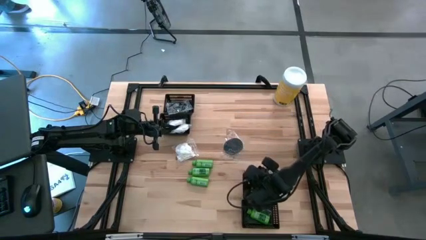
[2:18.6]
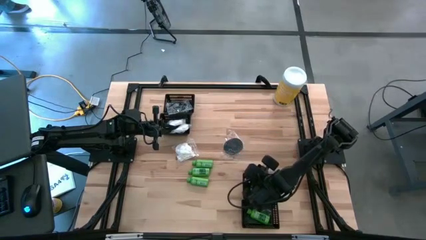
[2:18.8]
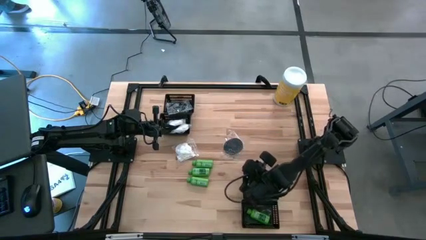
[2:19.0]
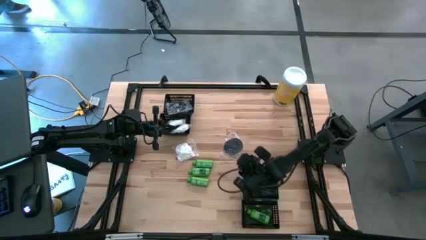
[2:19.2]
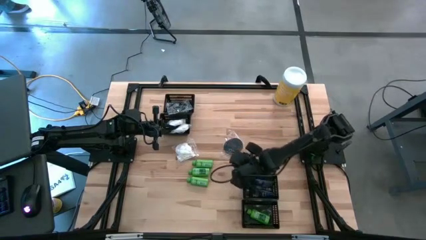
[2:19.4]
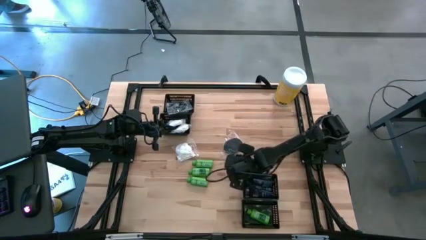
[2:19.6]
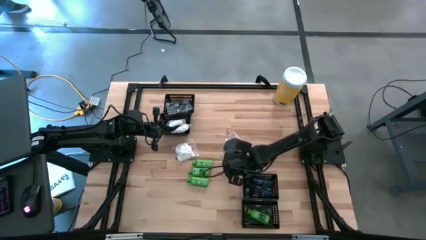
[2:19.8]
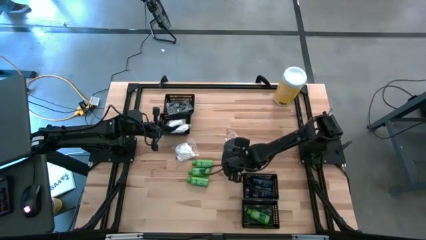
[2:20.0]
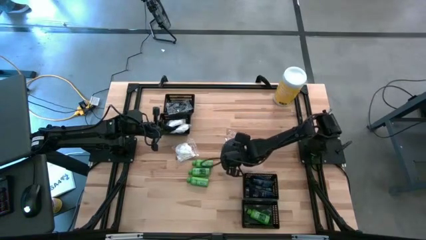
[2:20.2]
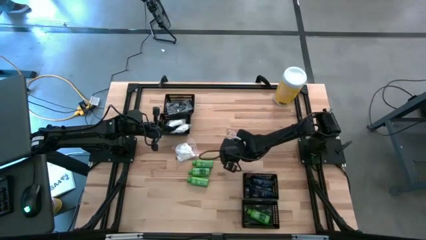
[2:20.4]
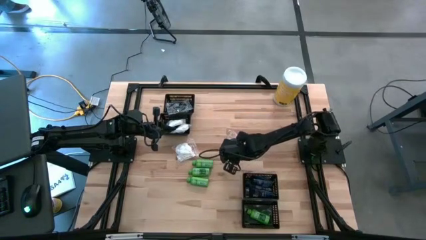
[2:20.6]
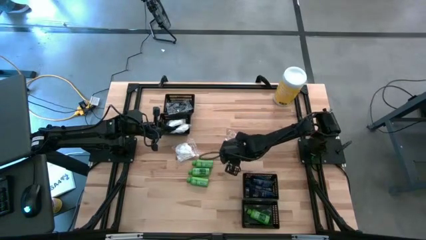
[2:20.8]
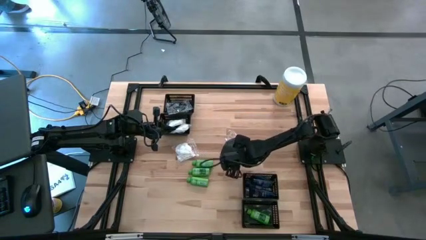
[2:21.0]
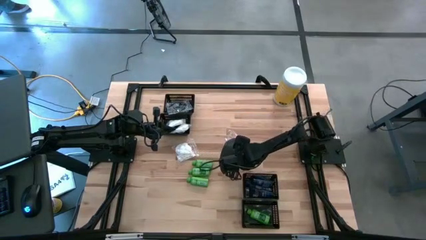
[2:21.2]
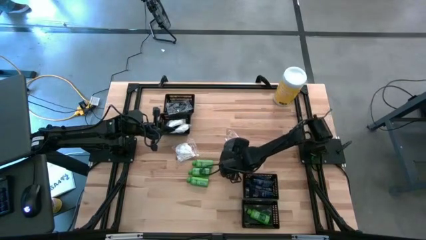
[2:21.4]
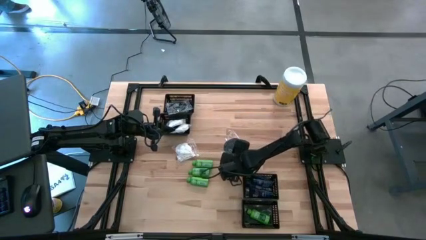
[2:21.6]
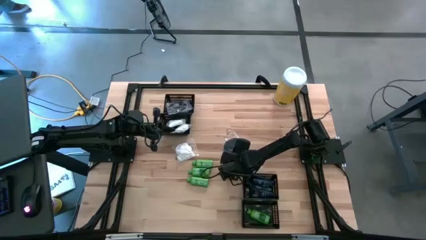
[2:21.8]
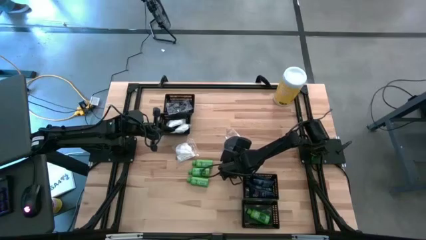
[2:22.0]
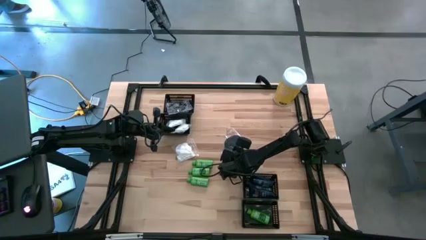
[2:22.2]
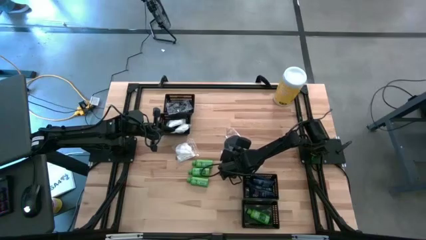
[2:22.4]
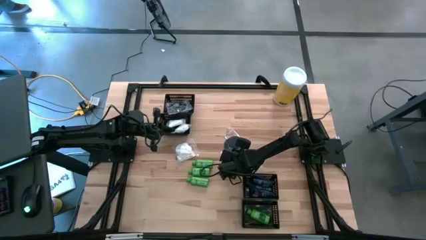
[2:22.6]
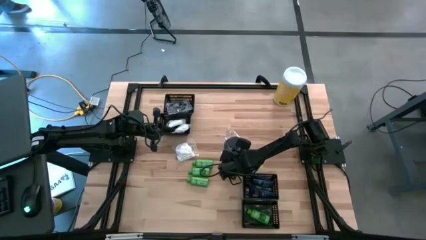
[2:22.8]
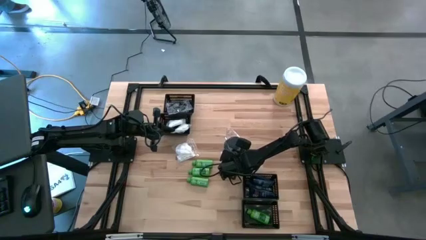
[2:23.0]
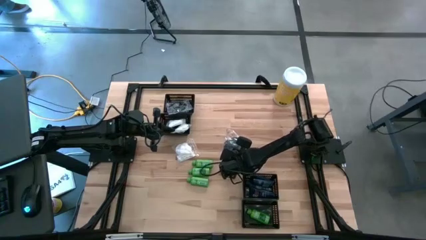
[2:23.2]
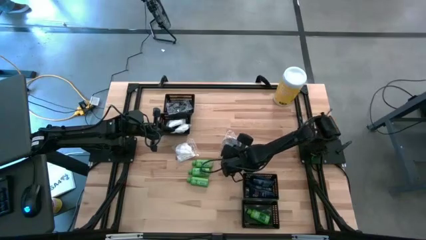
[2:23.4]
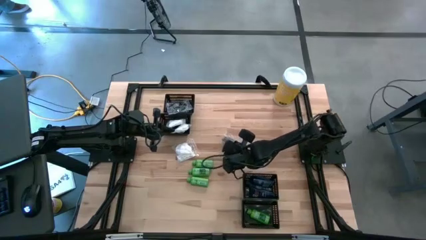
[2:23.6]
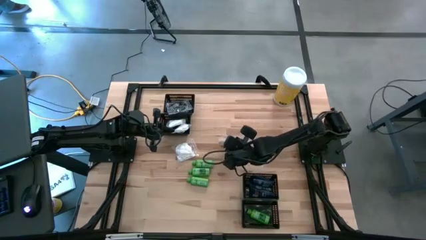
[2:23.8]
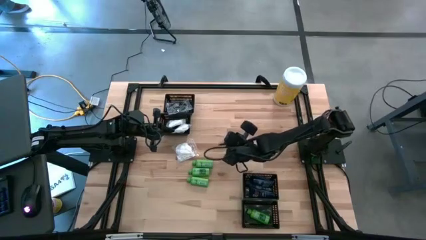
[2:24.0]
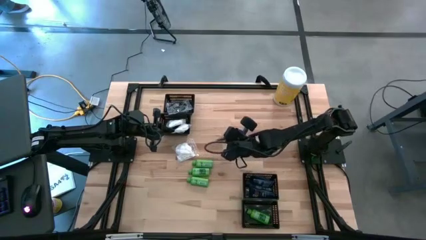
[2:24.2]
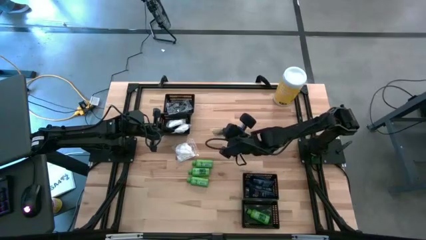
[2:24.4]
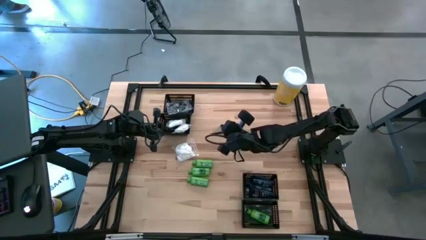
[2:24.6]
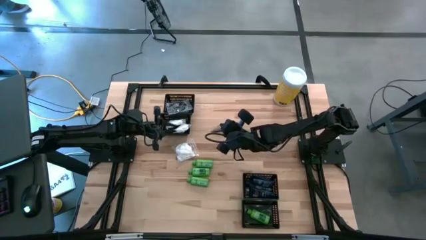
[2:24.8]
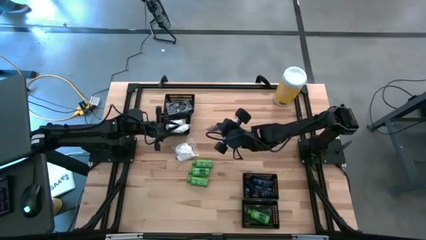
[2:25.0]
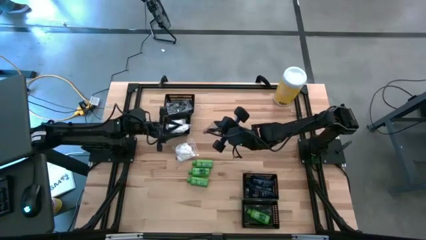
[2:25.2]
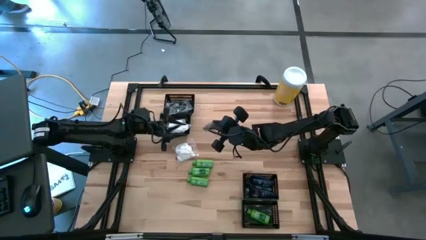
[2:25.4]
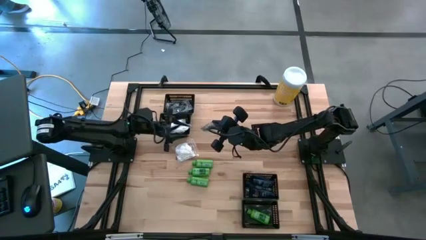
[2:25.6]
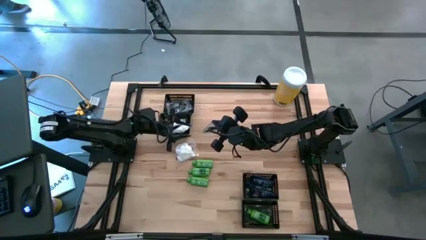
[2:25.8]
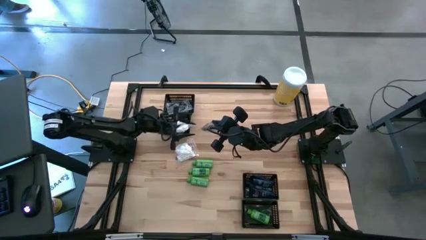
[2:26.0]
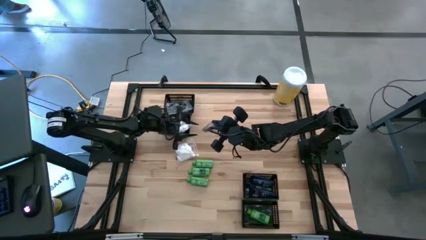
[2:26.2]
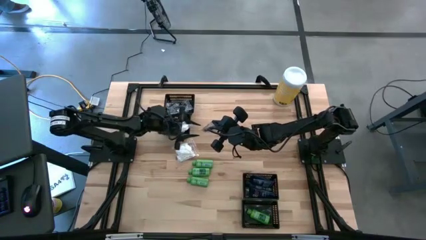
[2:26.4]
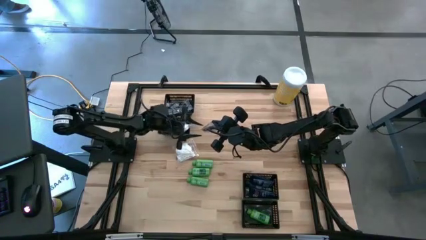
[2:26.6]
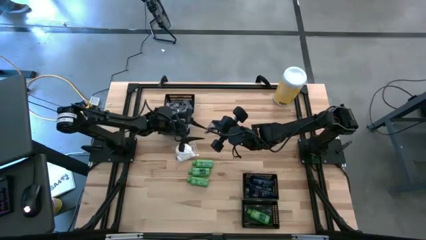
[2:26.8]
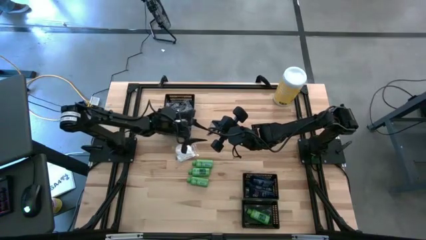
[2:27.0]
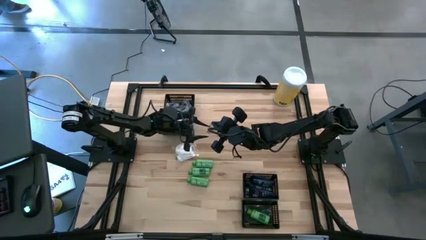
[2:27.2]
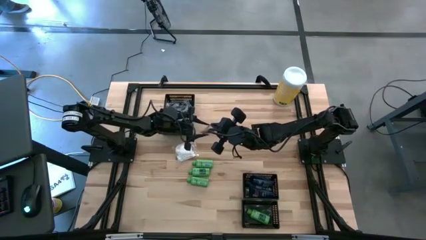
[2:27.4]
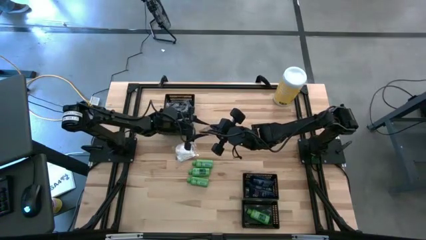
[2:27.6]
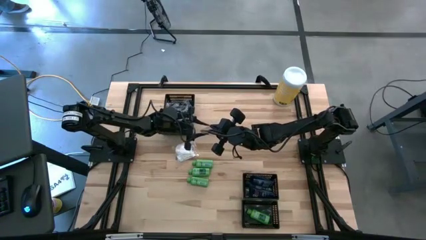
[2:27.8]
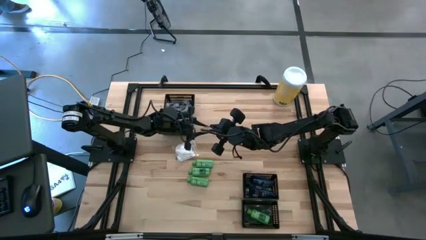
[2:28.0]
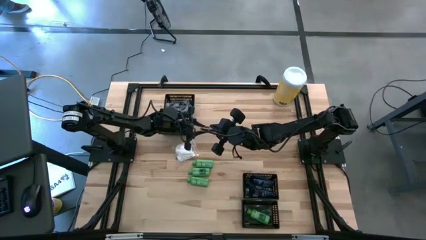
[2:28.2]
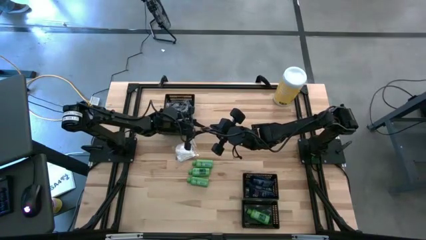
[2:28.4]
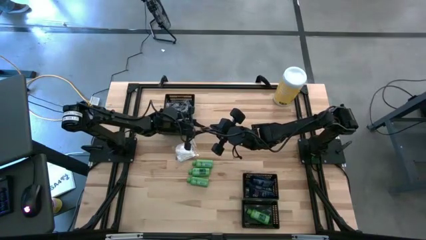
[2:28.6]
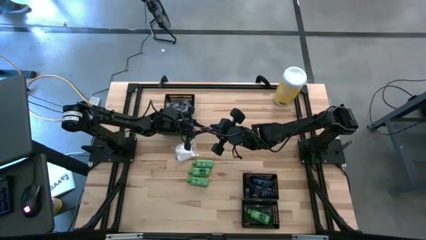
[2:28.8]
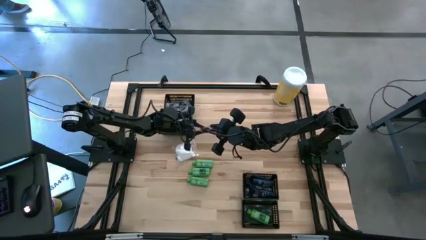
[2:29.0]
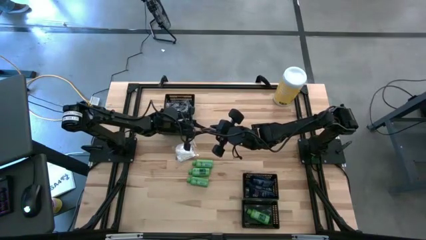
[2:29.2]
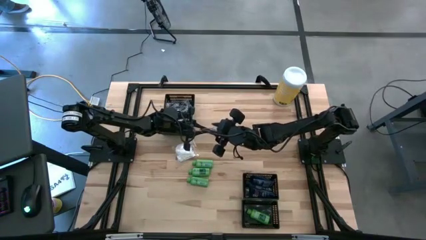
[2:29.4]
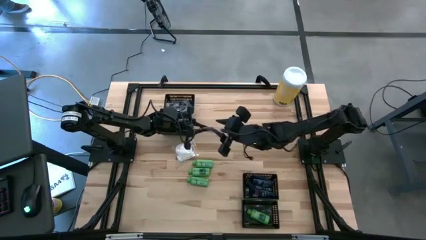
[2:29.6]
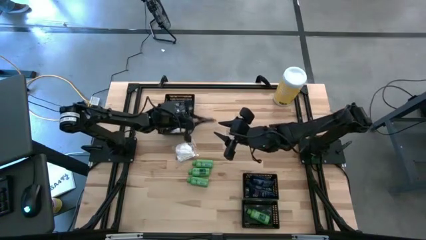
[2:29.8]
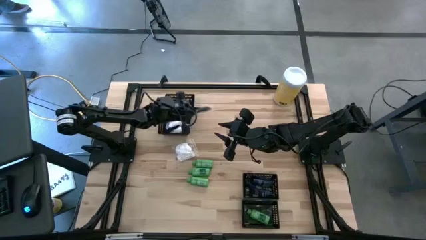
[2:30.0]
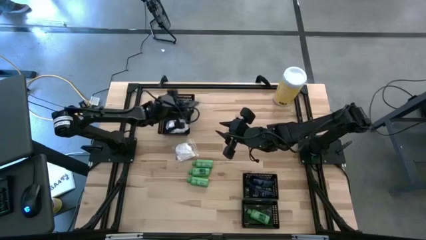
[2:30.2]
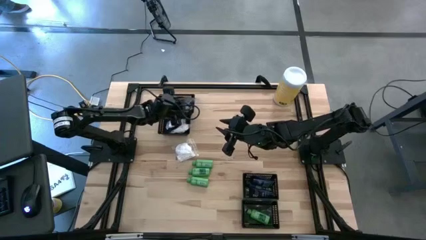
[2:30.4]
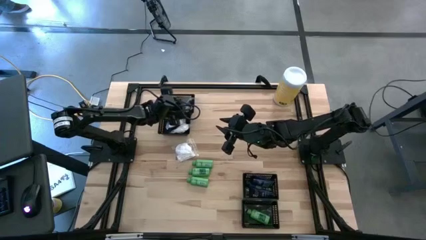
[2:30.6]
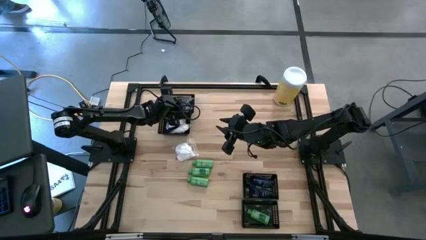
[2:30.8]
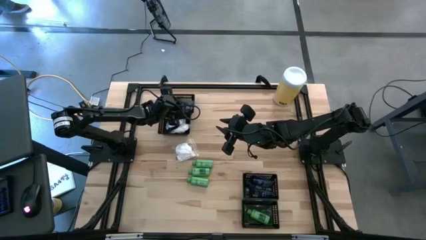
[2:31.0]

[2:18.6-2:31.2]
Task: Pick & Place Travel size toiletries
Put the black hairbrush into the top black basket
